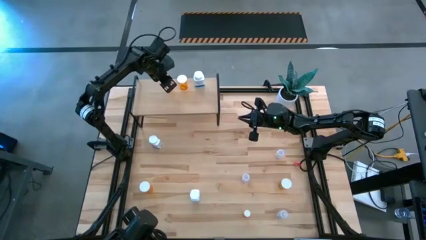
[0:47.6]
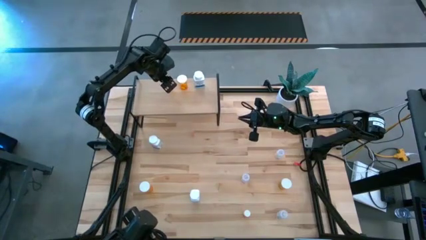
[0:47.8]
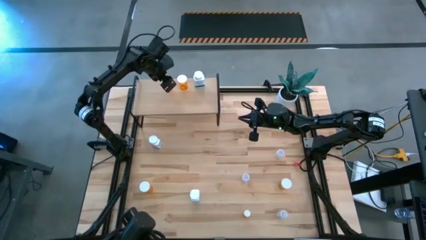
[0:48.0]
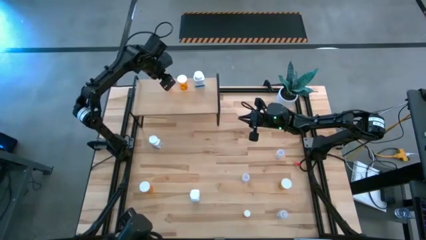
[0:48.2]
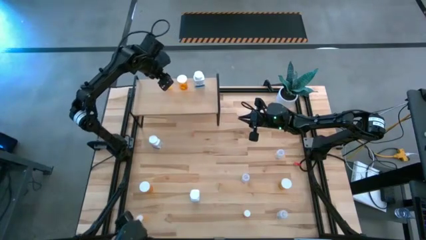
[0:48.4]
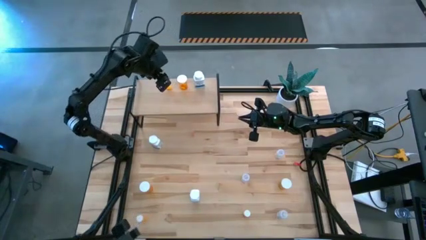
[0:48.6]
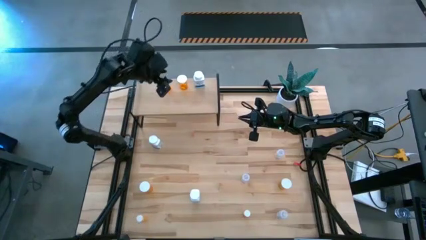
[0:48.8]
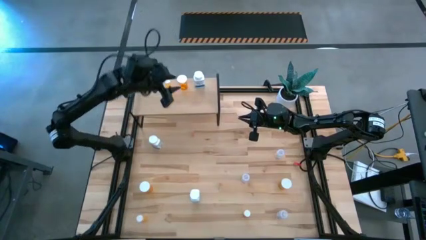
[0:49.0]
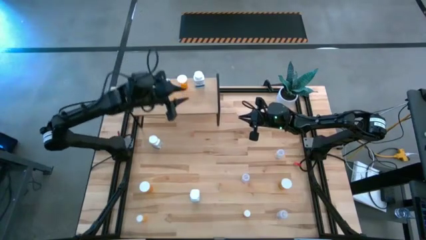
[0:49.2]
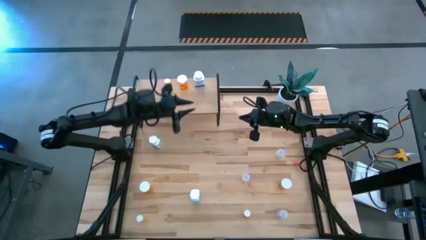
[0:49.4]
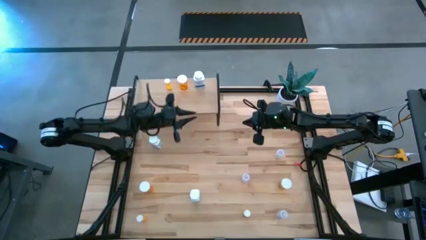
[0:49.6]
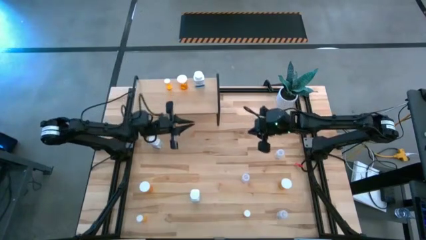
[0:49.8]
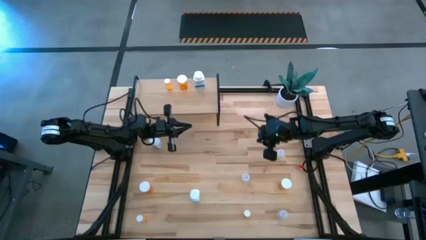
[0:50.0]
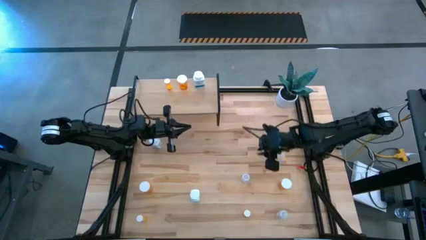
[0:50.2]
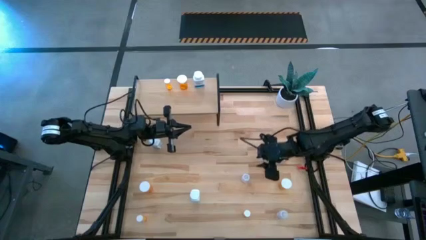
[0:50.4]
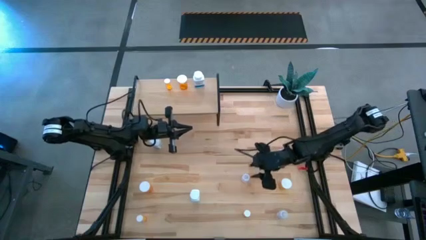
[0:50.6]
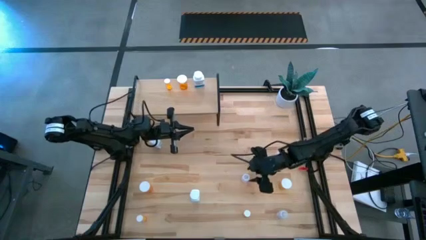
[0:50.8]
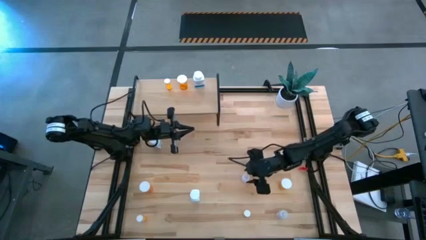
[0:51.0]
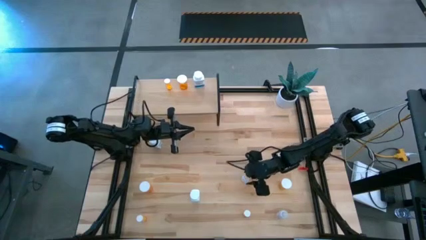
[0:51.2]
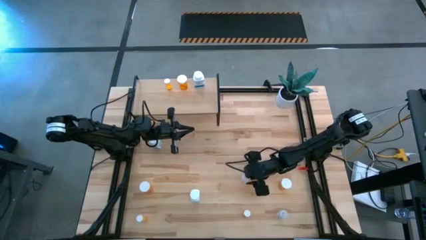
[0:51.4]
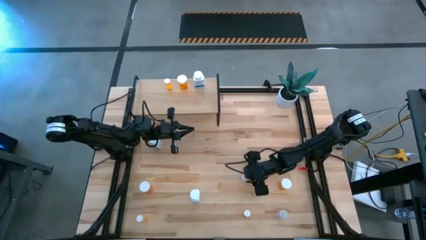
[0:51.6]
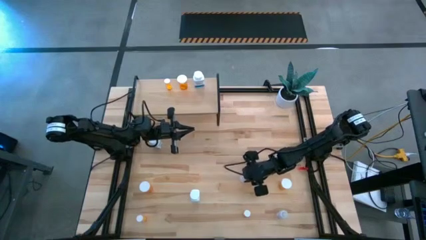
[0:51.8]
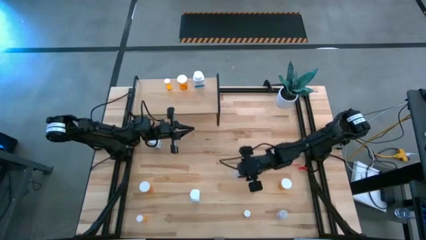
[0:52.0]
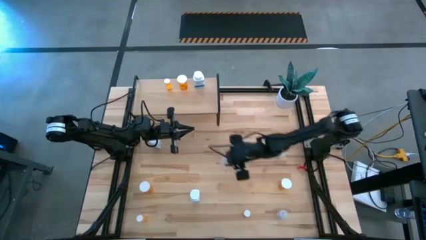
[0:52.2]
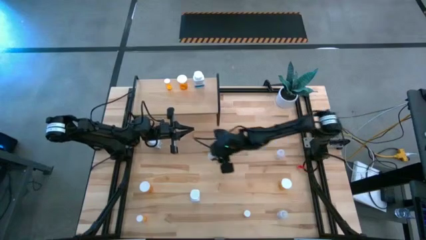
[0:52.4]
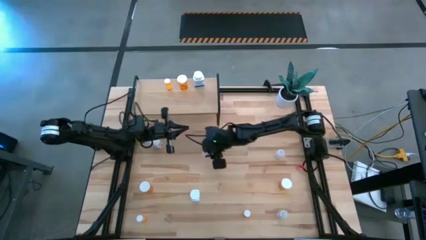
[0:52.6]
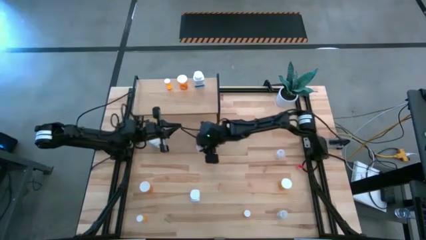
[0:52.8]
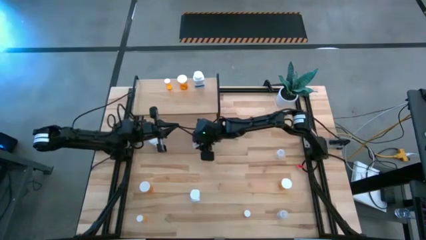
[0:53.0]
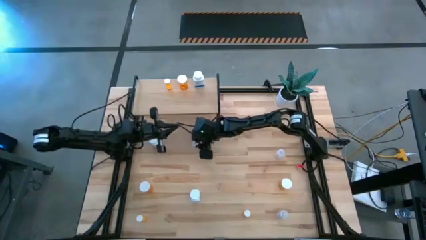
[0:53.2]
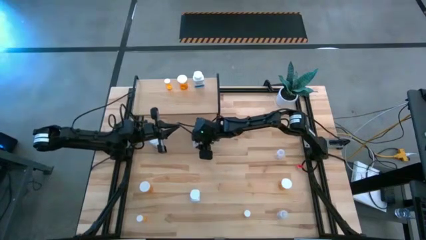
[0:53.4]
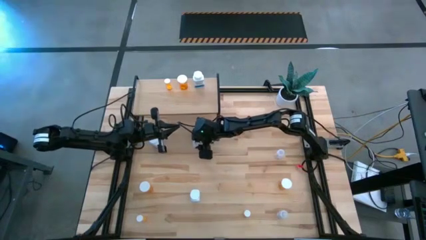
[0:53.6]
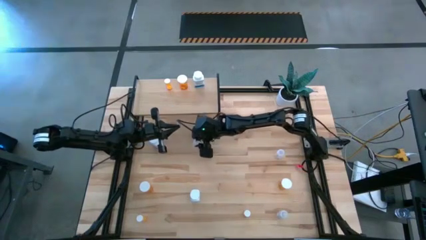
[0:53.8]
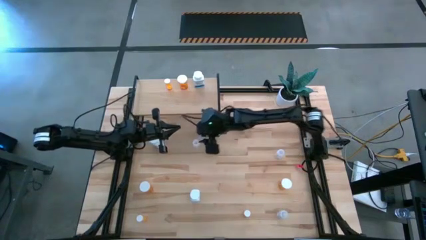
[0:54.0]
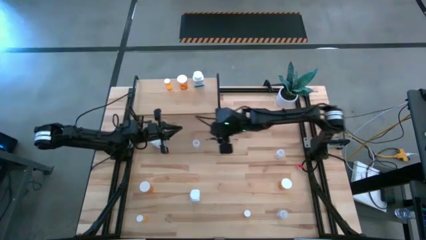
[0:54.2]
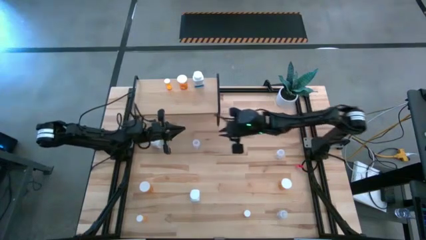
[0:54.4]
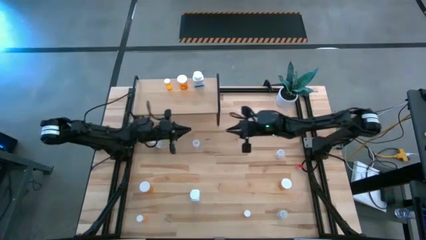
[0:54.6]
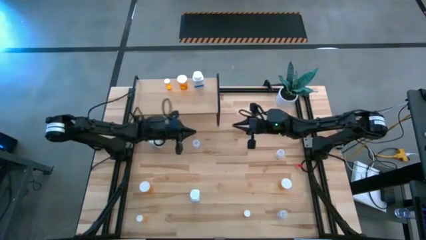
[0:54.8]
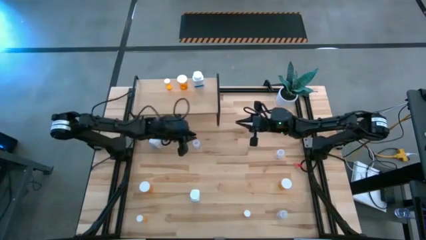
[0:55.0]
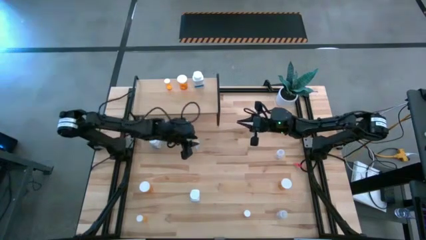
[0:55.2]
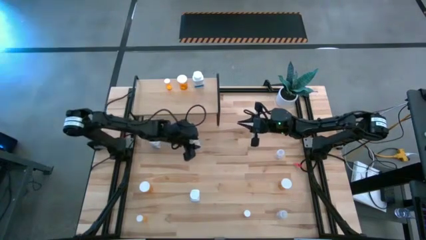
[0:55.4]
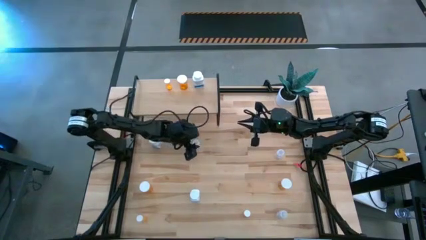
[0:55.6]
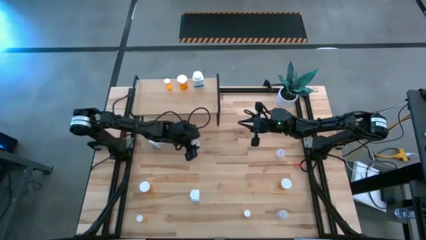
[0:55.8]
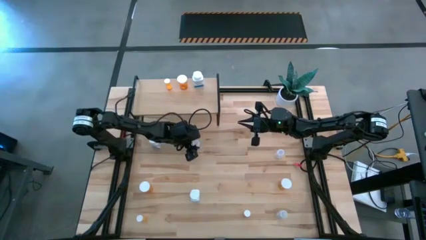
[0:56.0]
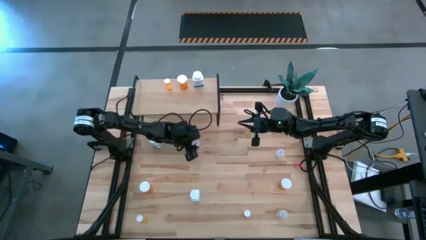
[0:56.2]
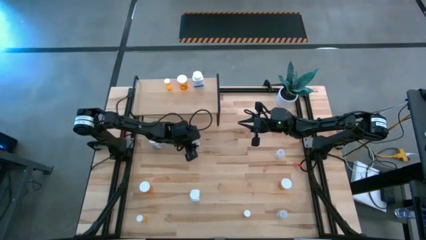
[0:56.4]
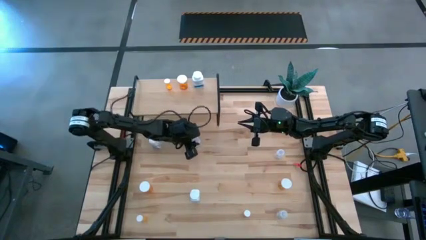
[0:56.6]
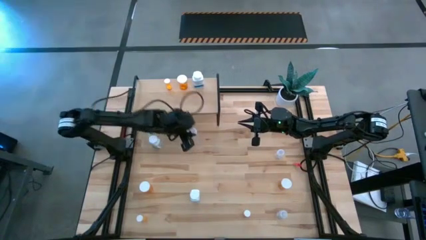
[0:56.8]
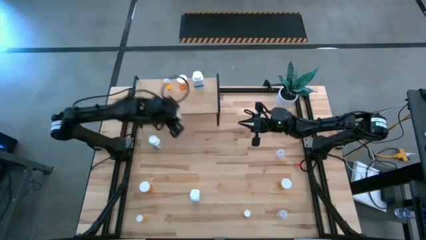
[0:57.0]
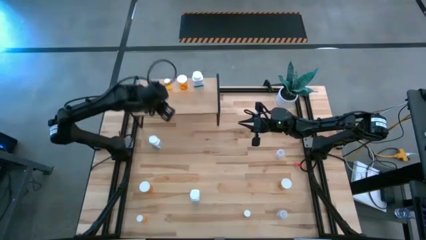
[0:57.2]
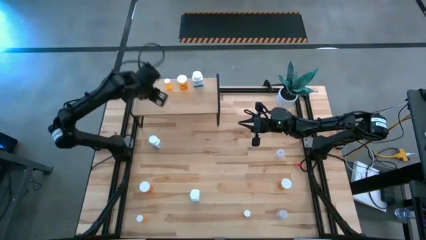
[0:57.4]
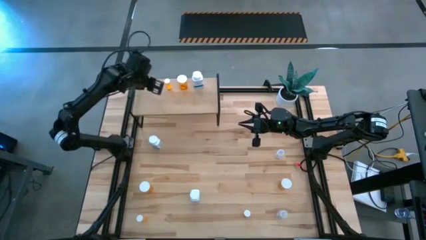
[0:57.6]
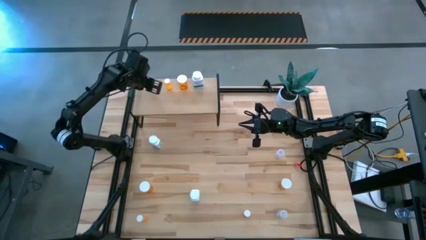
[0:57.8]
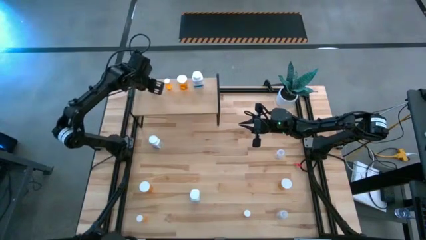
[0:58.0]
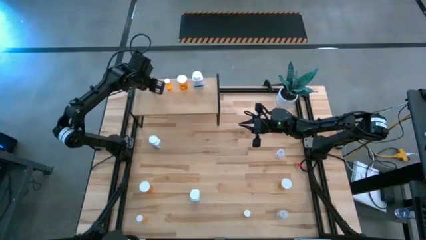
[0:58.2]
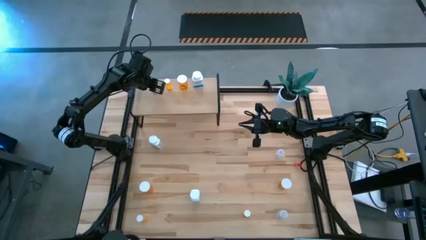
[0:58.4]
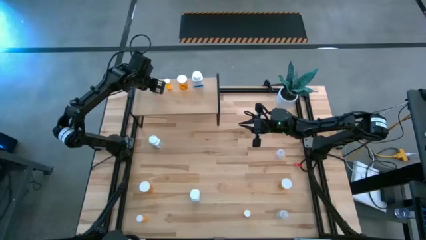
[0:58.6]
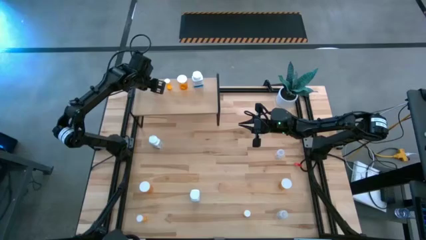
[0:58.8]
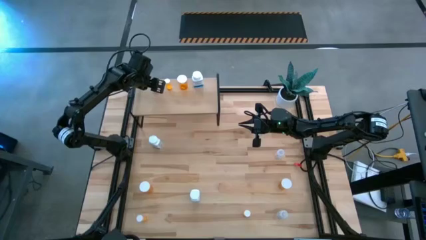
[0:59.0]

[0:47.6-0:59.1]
Task: Pick and place medicine bottles onto shelf by color
Put the middle transparent pill bottle on the shelf
